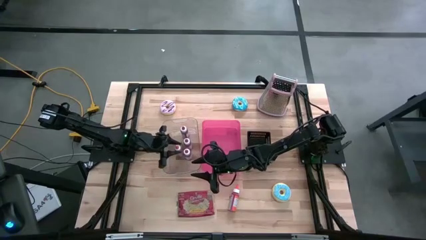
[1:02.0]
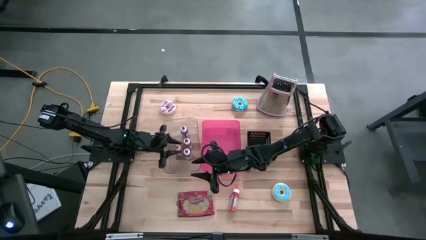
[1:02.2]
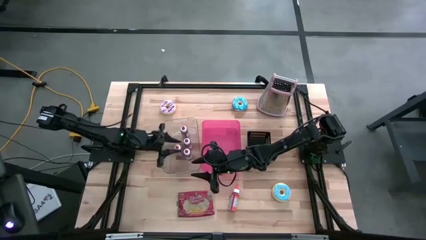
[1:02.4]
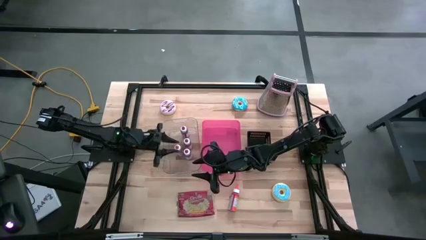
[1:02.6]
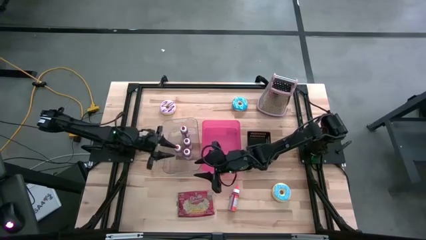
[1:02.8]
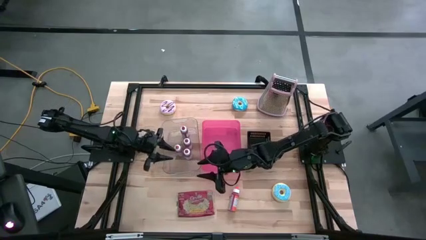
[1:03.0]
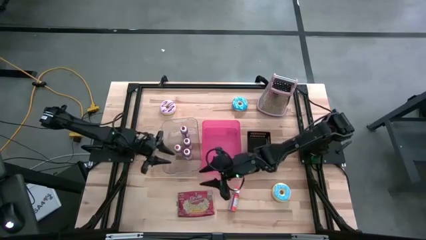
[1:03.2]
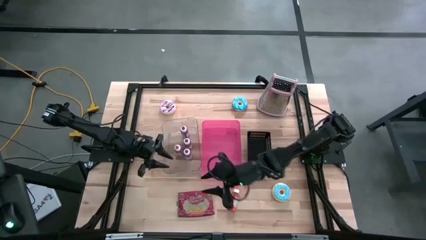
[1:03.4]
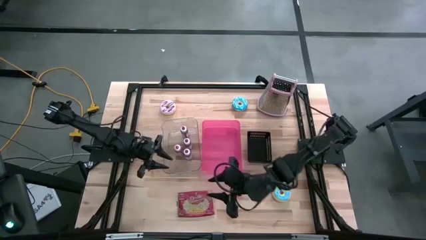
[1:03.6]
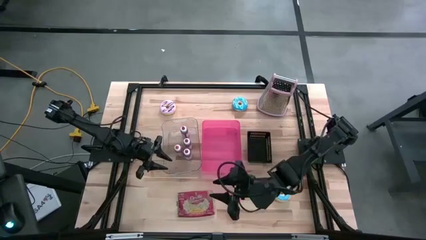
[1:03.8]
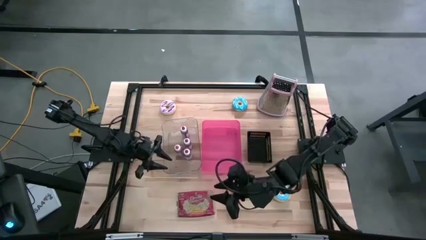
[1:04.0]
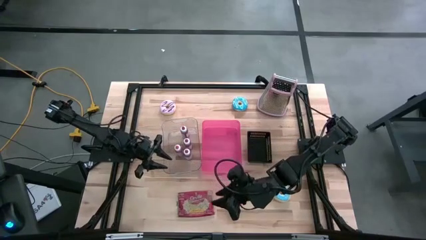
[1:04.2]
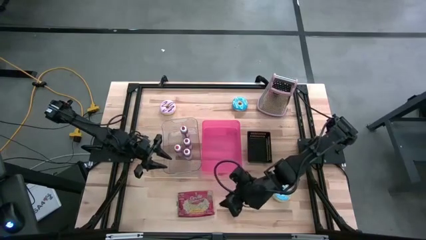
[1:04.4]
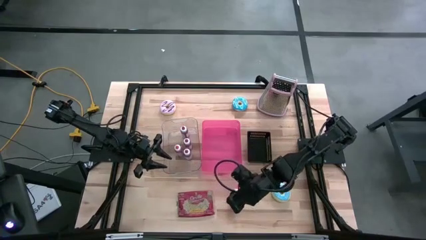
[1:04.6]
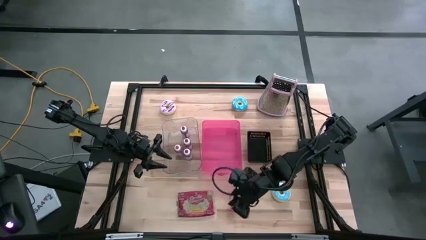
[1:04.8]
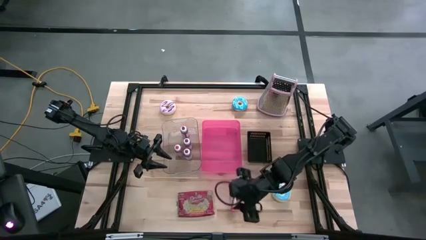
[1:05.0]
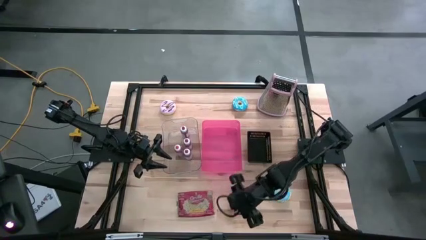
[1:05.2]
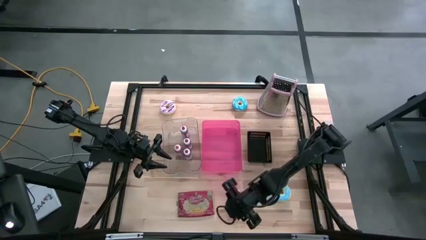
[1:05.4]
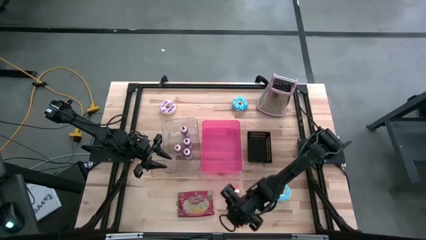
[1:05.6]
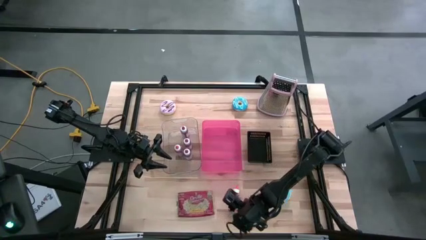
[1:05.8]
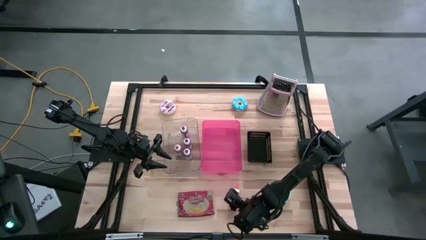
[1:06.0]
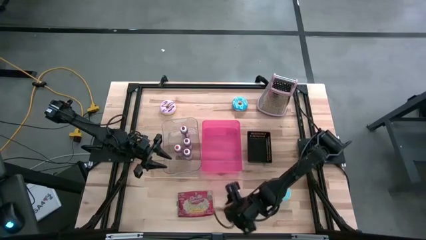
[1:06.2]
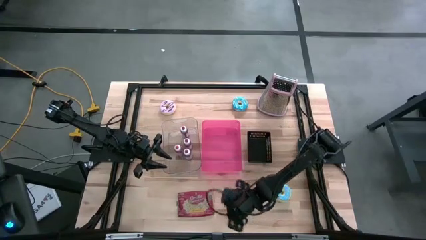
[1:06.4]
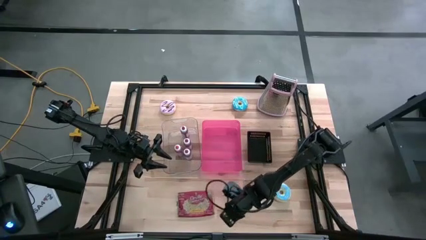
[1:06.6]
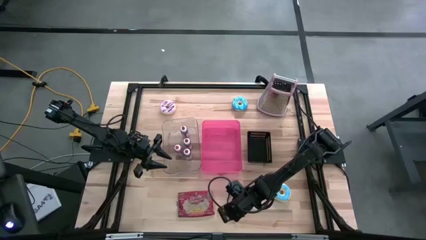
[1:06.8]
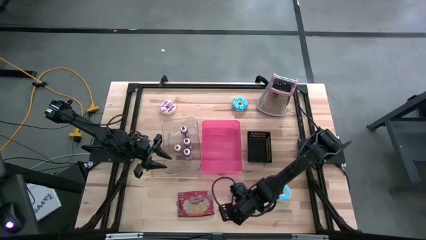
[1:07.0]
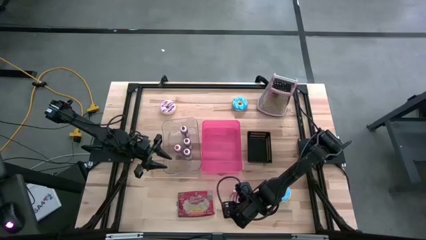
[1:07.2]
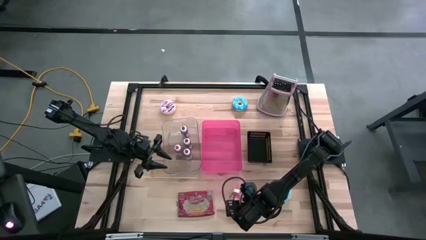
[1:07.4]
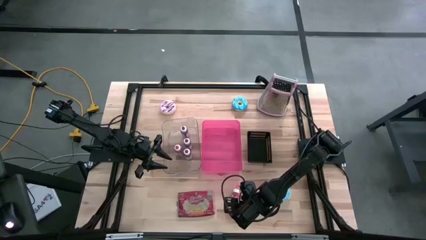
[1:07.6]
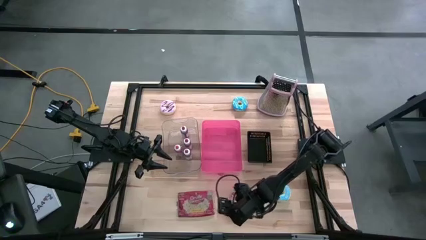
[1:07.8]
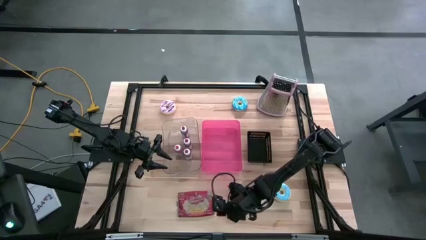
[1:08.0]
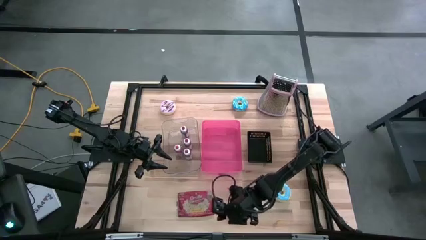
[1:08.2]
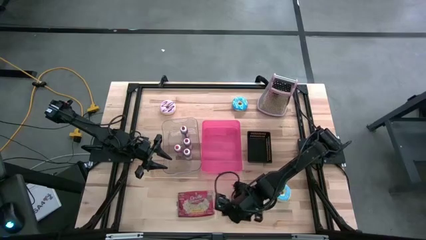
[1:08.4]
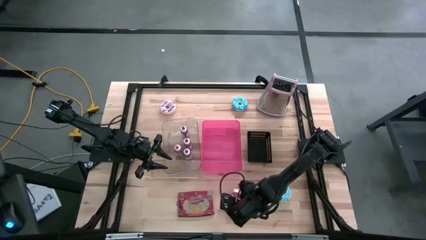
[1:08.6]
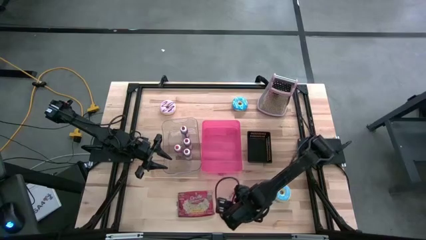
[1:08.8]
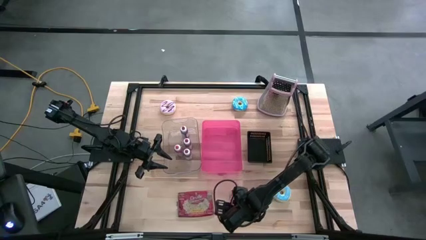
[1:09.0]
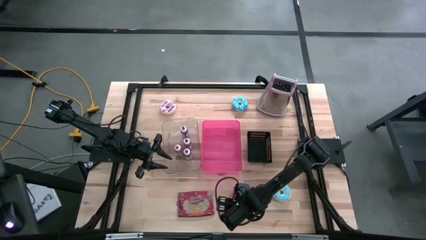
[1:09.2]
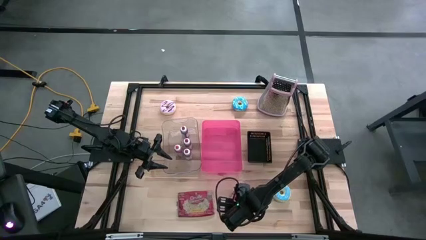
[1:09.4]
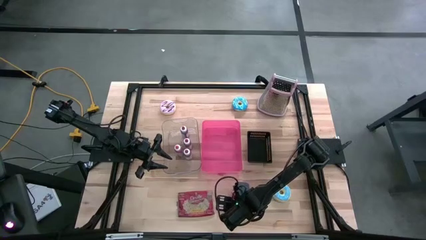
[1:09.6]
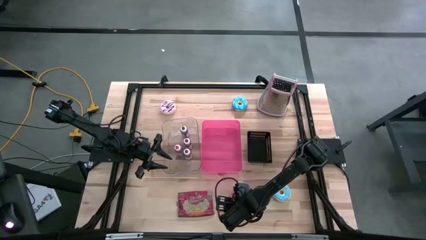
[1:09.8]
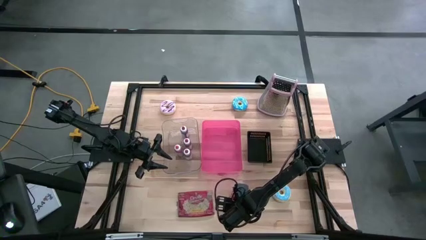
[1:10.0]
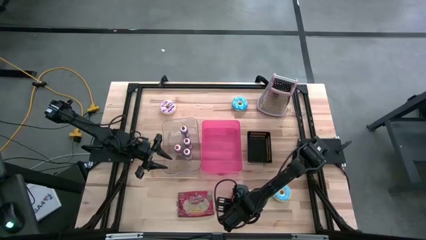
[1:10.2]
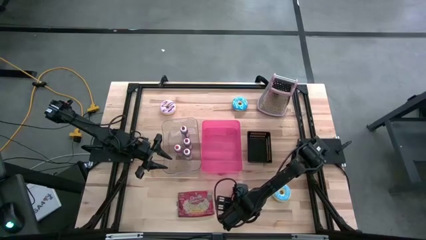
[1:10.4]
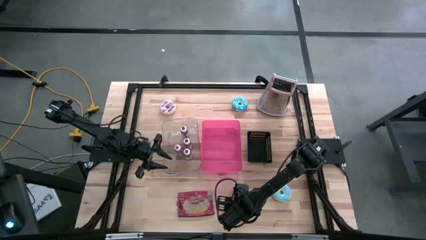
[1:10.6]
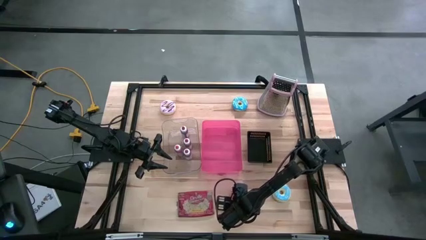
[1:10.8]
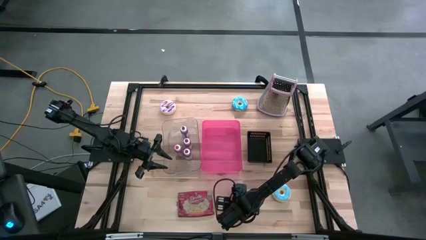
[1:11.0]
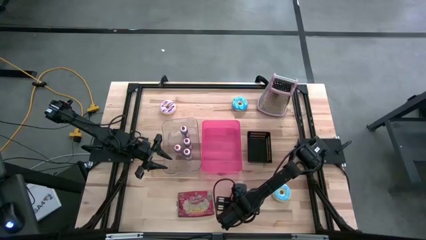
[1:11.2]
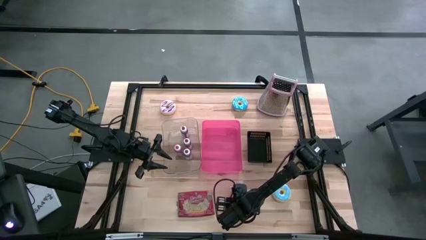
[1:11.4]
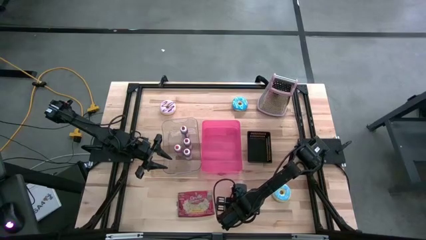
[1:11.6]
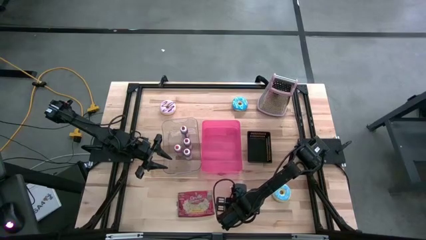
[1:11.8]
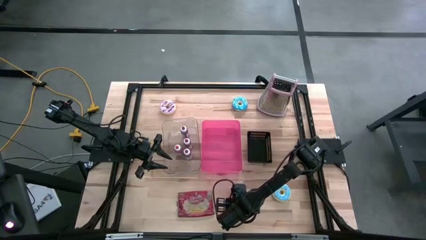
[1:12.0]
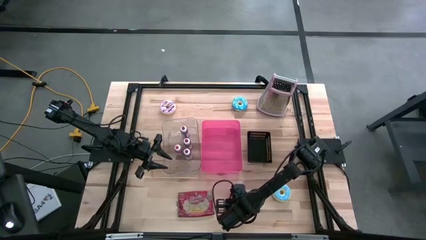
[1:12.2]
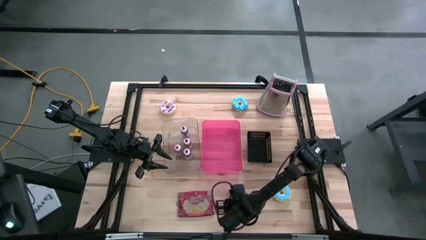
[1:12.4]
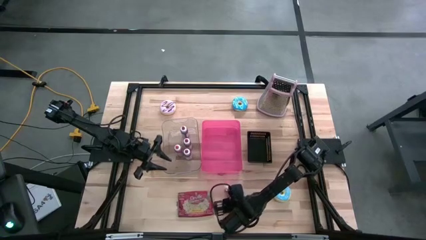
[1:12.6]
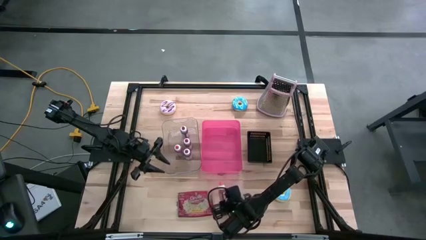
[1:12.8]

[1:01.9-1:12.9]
Task: Pick & Place Food Item
Put the orange food coloring bottle into the transparent bin
